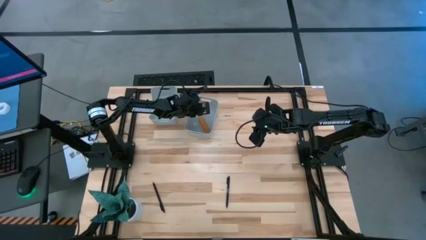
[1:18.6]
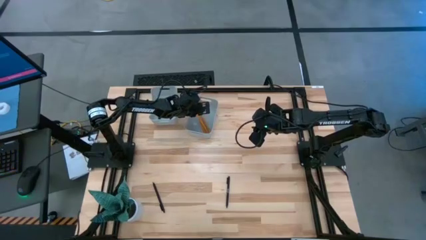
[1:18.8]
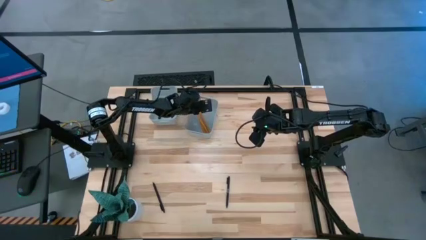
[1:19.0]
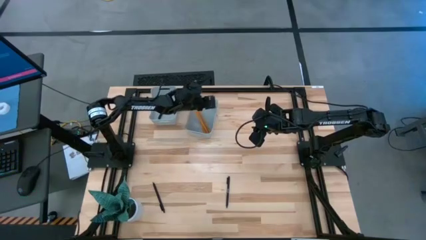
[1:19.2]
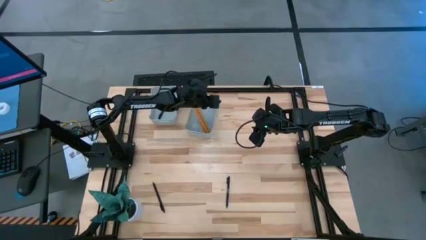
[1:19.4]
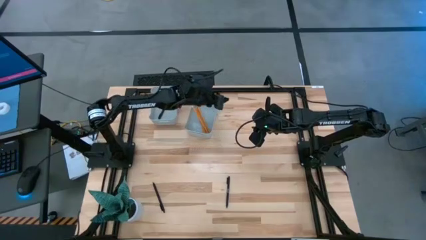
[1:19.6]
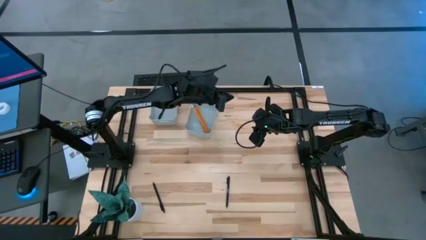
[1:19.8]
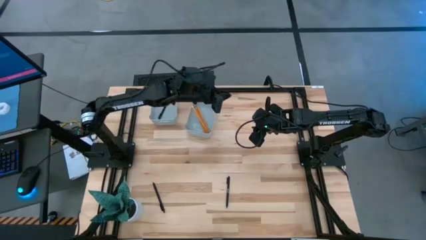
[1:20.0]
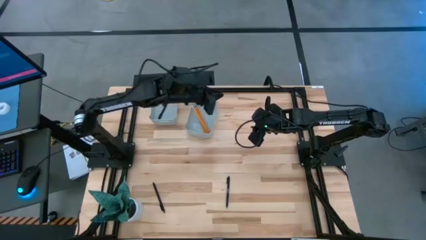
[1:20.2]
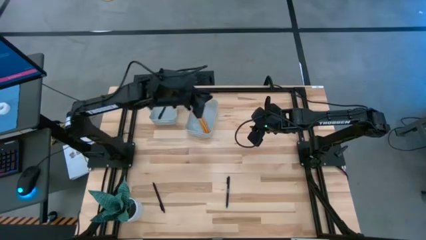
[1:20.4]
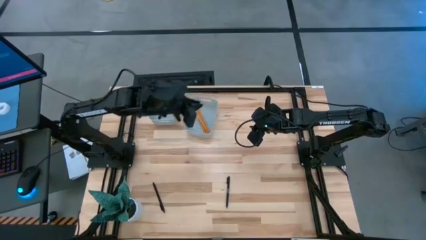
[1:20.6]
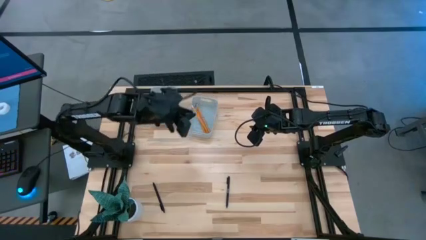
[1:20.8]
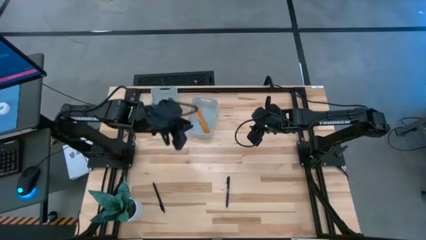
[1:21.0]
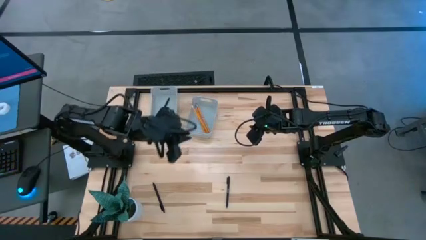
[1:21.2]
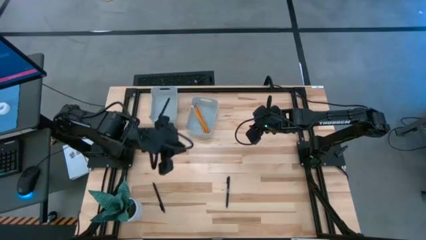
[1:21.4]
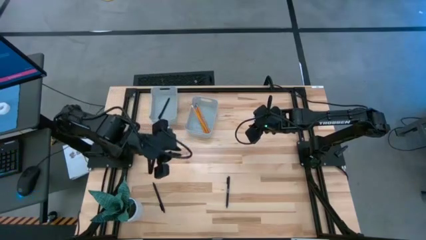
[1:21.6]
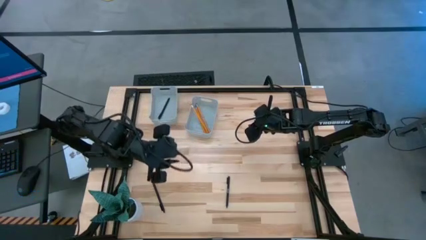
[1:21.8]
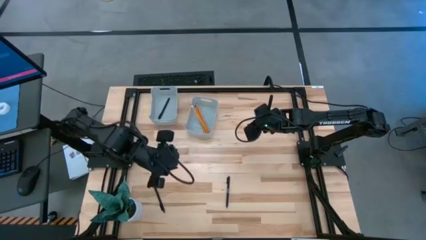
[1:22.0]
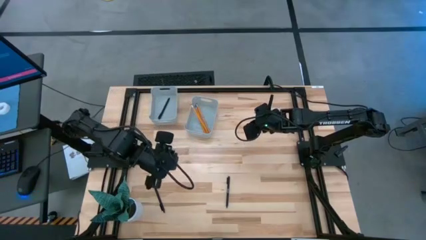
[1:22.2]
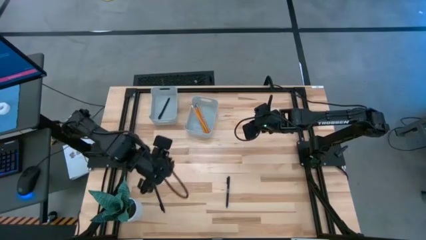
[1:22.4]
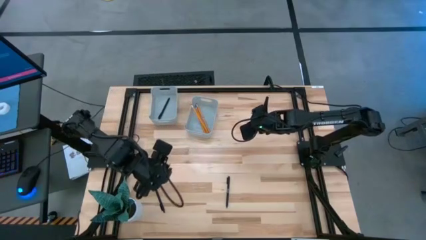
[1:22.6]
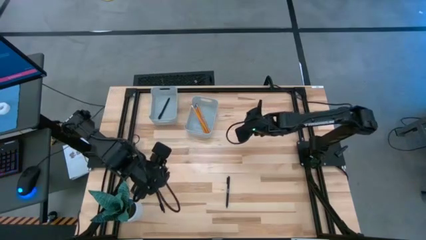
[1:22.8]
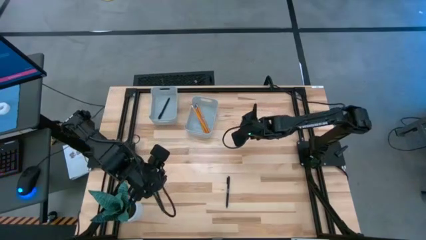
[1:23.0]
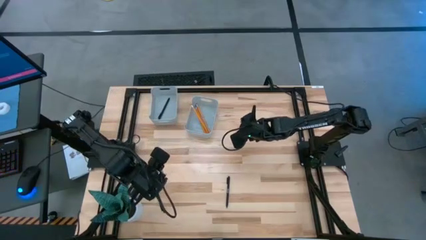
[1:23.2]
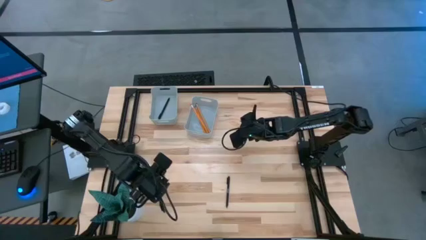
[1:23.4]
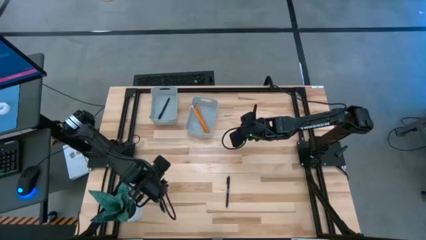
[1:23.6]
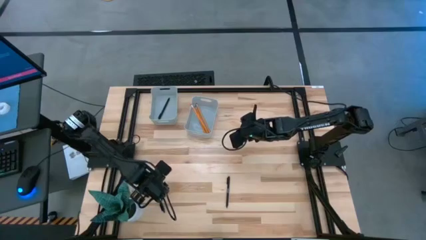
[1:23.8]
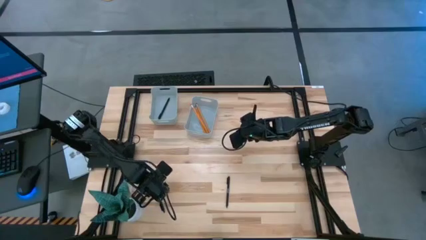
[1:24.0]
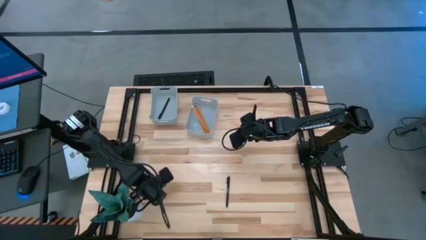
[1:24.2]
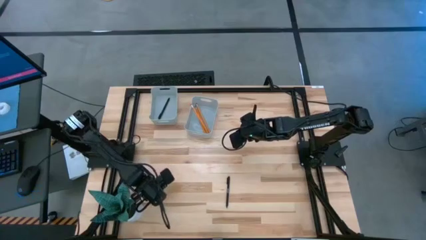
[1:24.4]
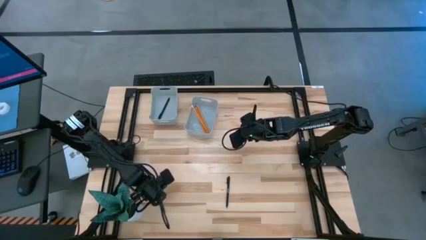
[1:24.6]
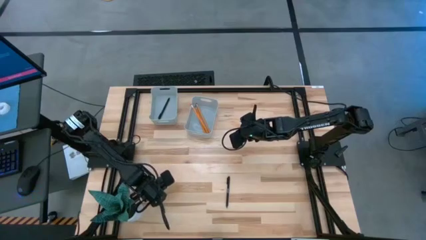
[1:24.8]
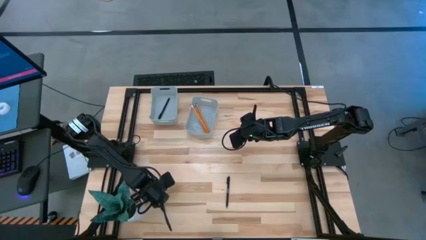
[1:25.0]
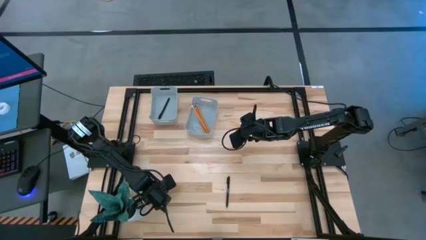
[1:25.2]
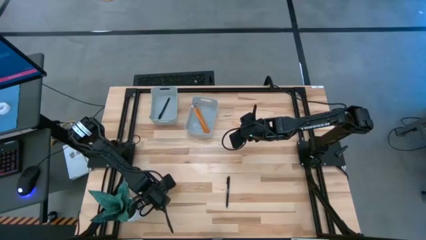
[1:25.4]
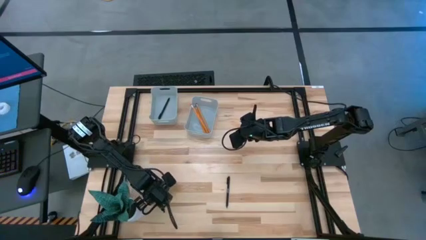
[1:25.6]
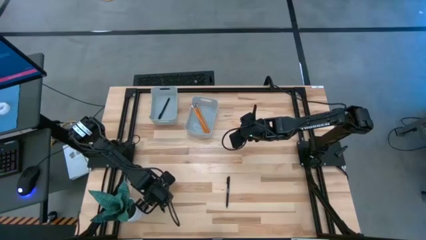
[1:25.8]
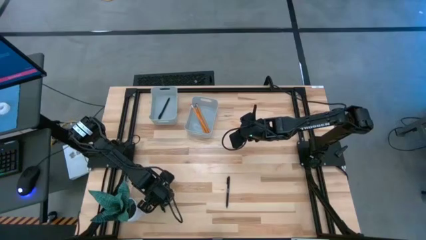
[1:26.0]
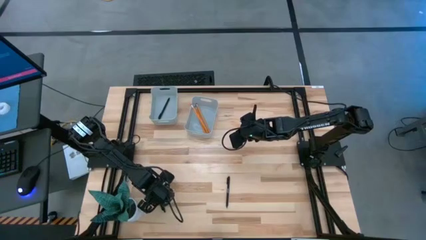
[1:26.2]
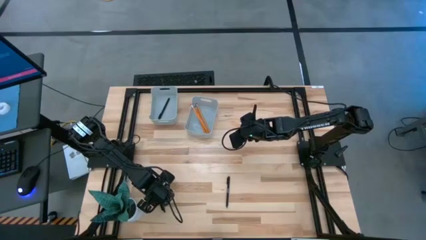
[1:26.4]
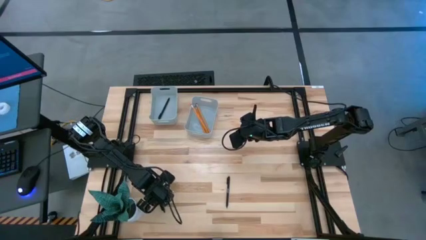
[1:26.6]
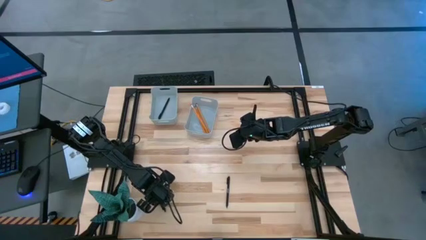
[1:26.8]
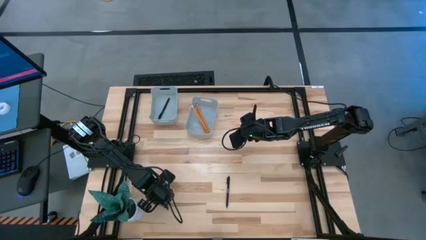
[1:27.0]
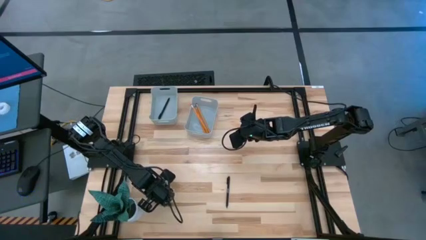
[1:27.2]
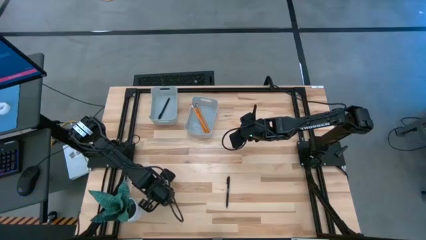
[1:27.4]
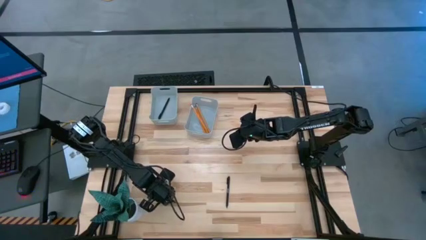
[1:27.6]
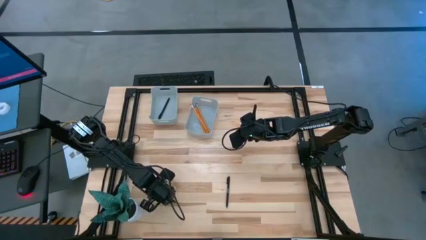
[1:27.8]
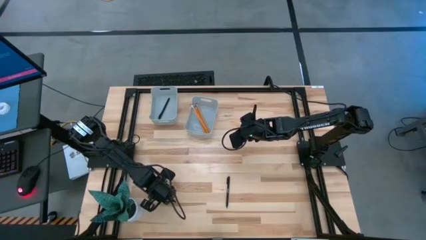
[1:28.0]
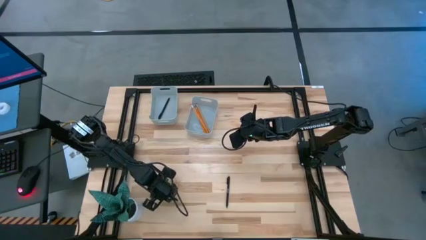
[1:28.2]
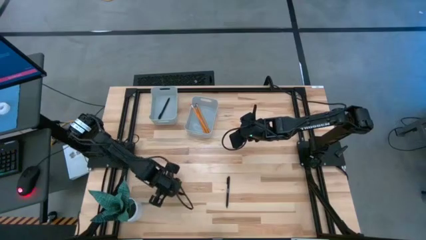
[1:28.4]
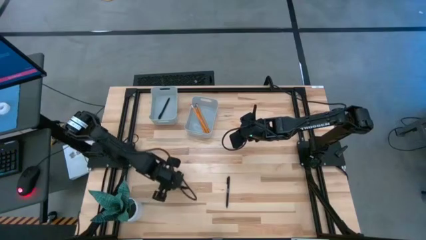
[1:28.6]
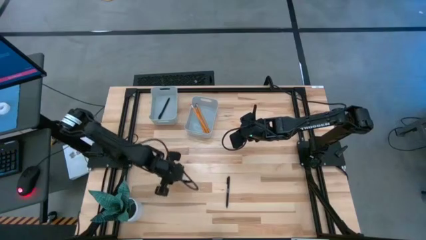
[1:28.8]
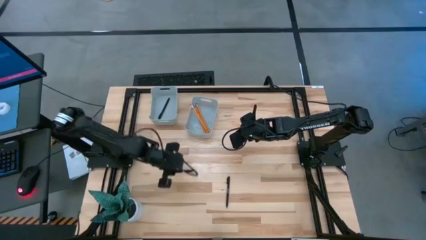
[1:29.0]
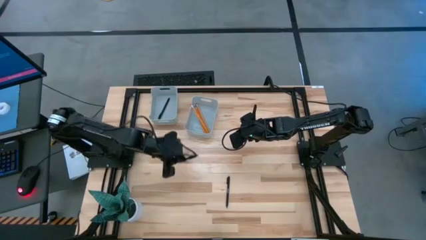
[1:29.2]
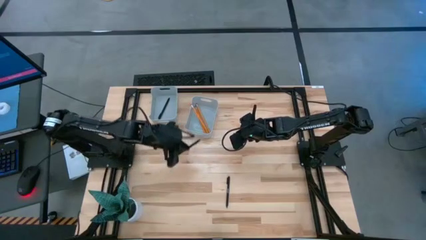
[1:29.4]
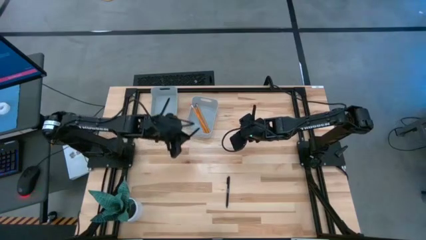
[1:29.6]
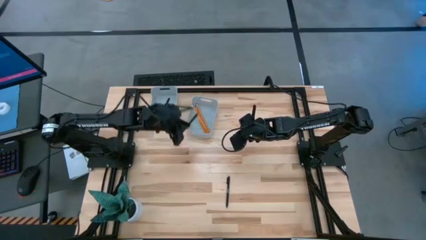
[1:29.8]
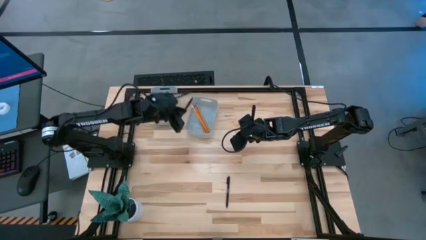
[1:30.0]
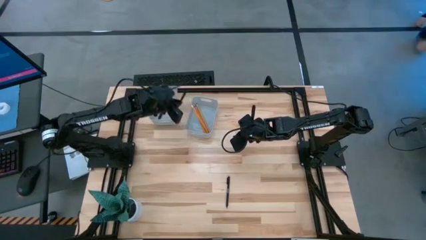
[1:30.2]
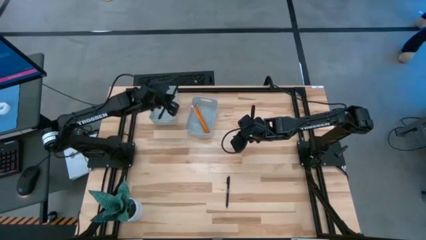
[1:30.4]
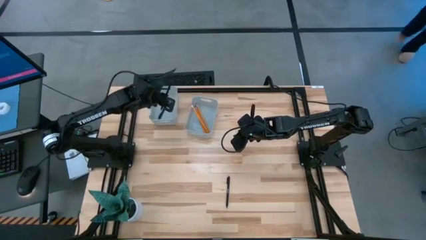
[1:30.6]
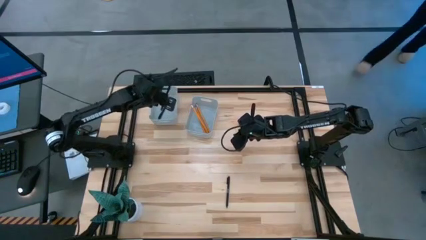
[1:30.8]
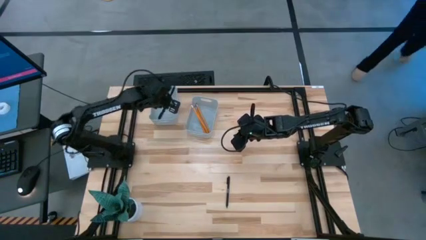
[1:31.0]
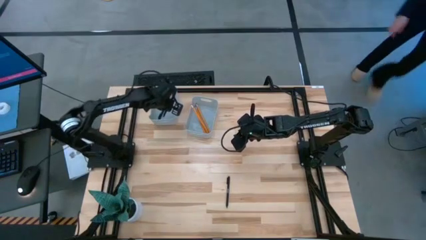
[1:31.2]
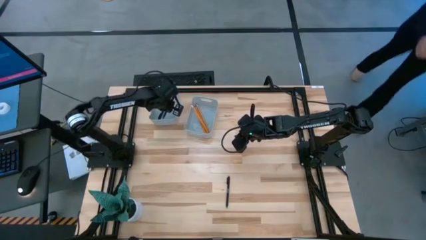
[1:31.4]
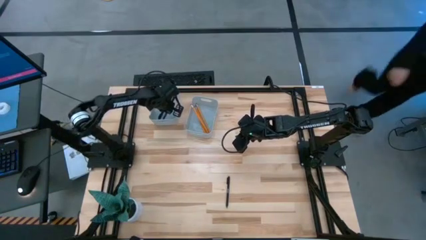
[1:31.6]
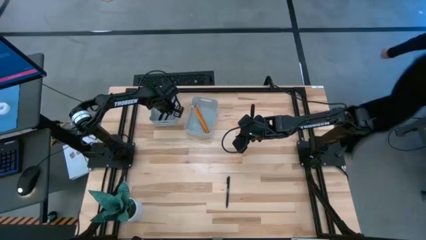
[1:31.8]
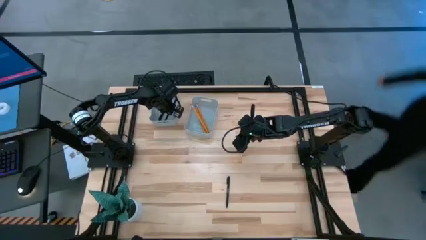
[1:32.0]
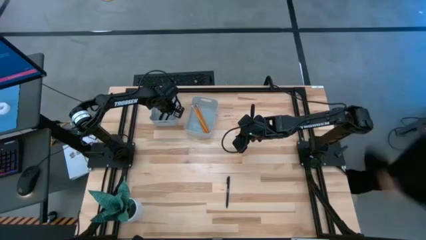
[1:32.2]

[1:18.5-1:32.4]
Task: Sort pens & pencils
Put the left black pen into the left gray bin
